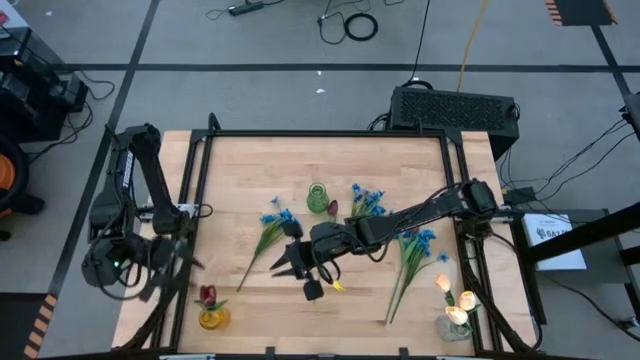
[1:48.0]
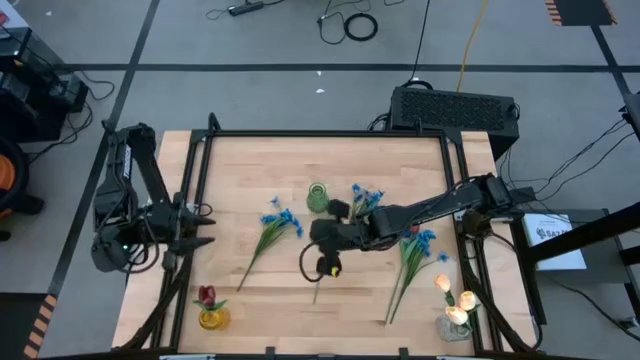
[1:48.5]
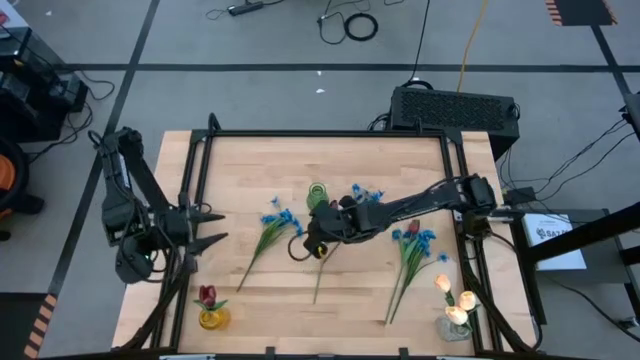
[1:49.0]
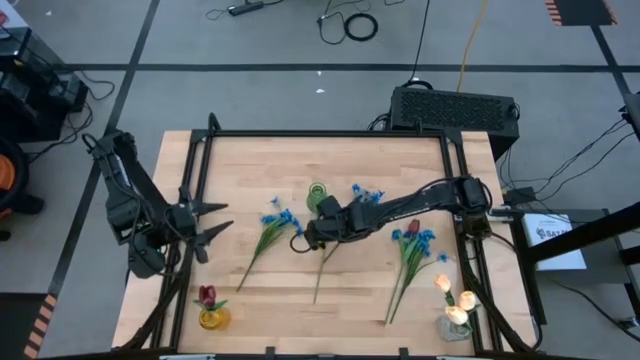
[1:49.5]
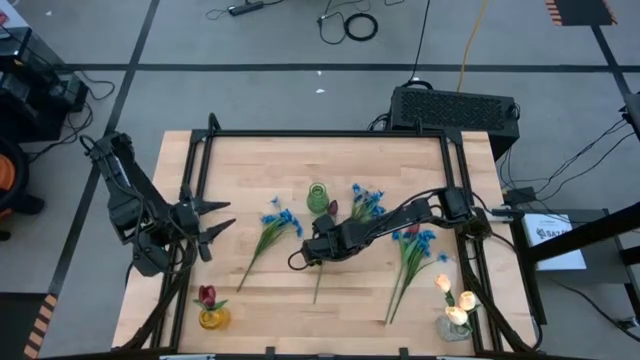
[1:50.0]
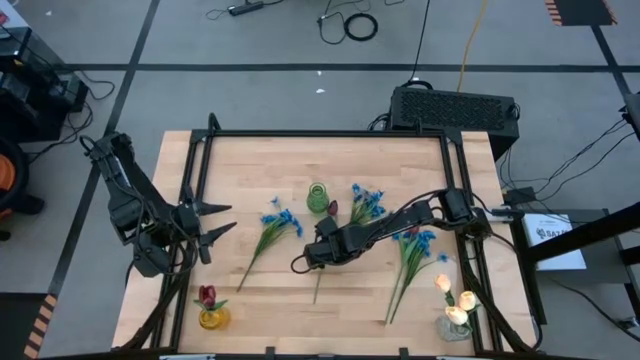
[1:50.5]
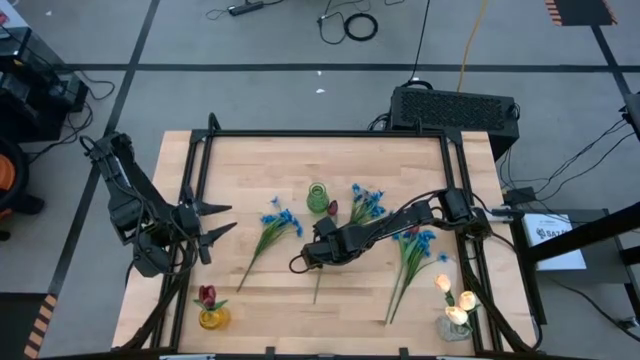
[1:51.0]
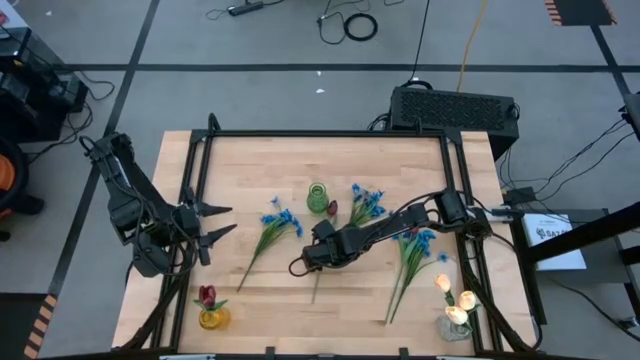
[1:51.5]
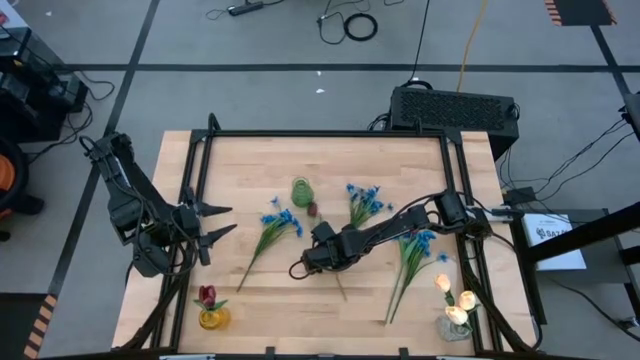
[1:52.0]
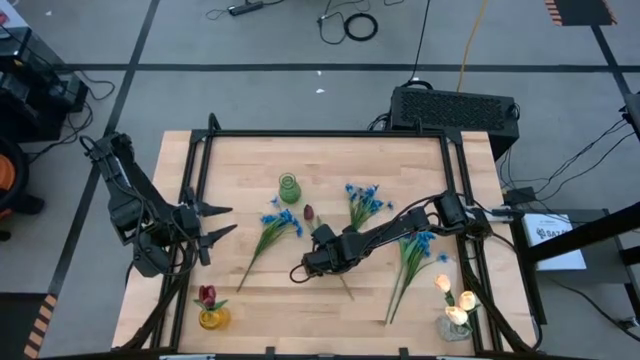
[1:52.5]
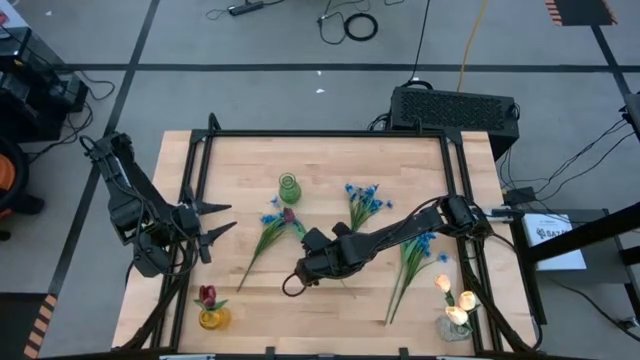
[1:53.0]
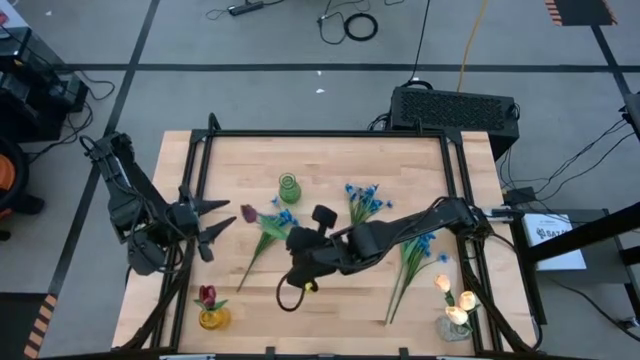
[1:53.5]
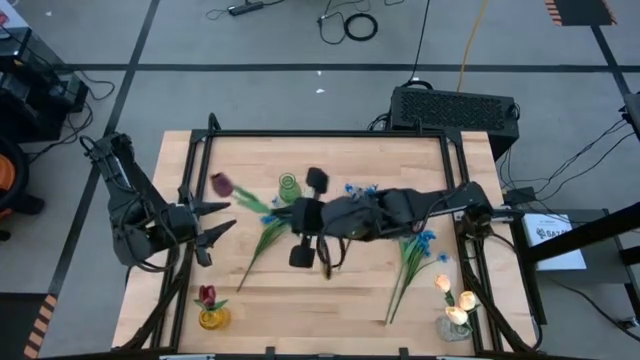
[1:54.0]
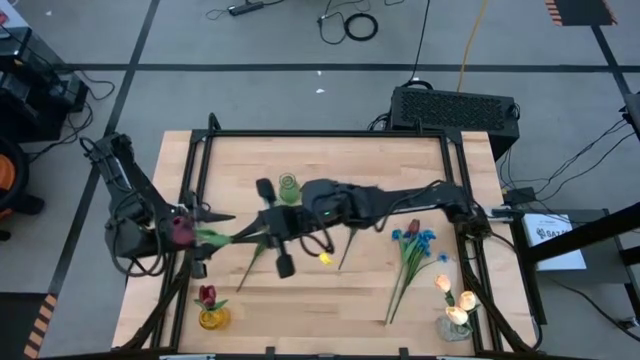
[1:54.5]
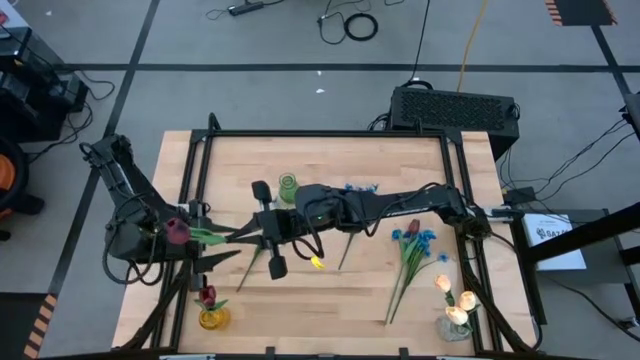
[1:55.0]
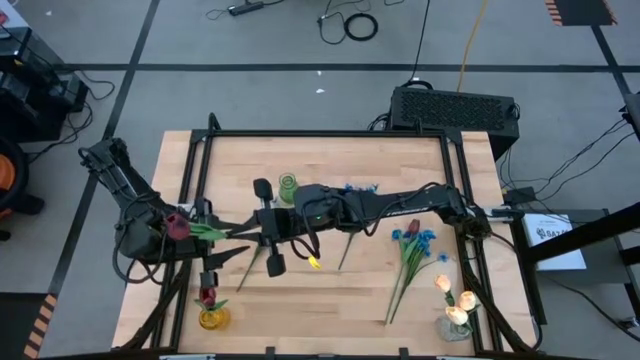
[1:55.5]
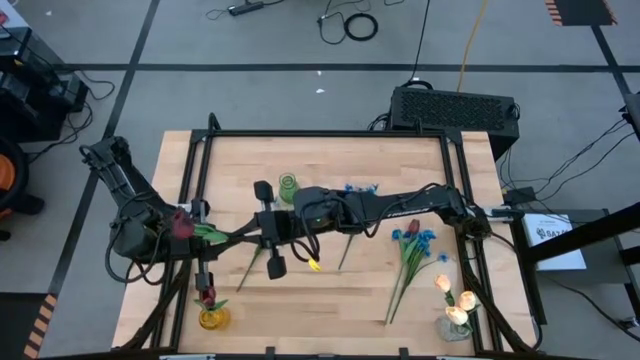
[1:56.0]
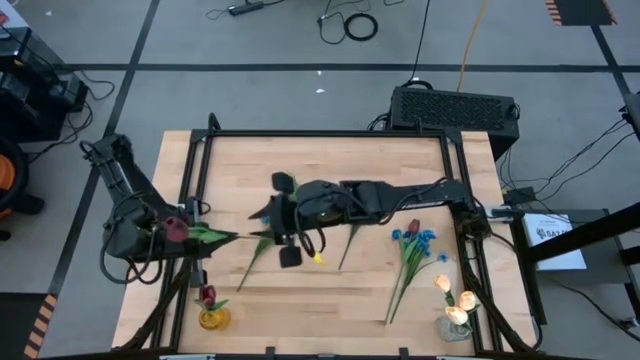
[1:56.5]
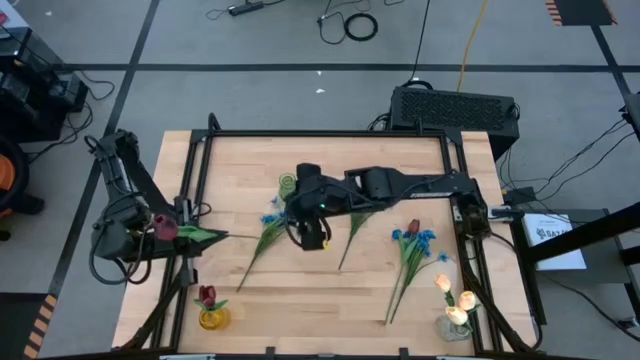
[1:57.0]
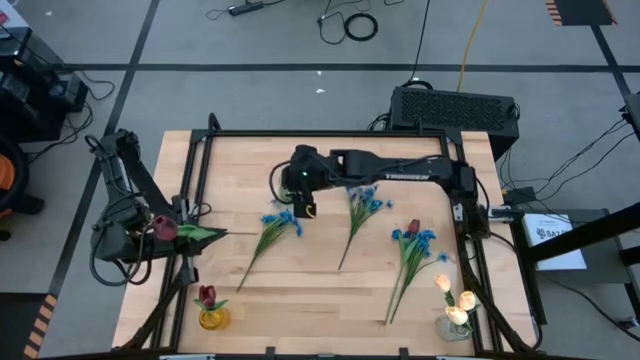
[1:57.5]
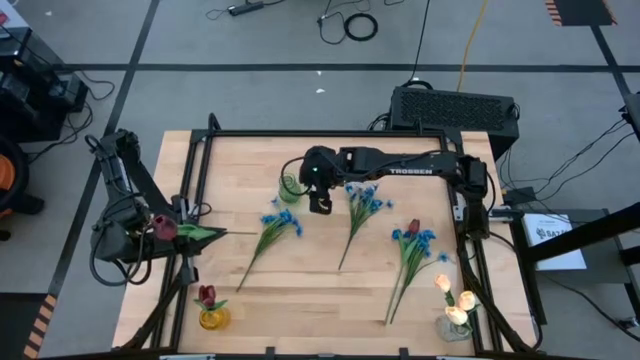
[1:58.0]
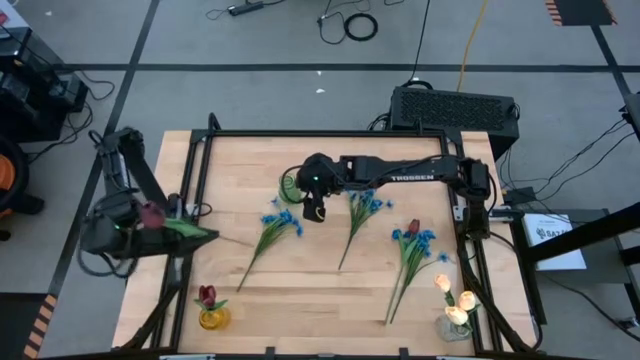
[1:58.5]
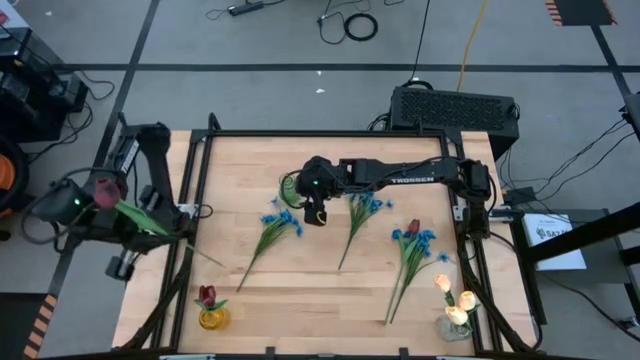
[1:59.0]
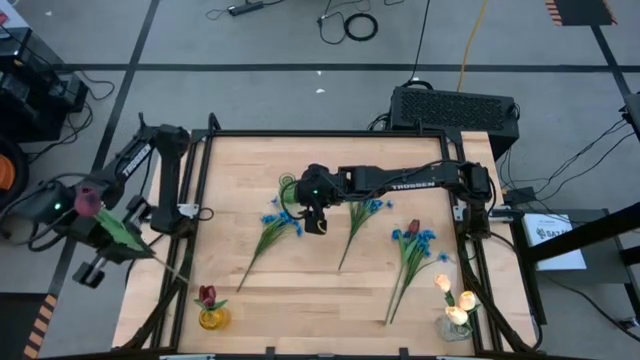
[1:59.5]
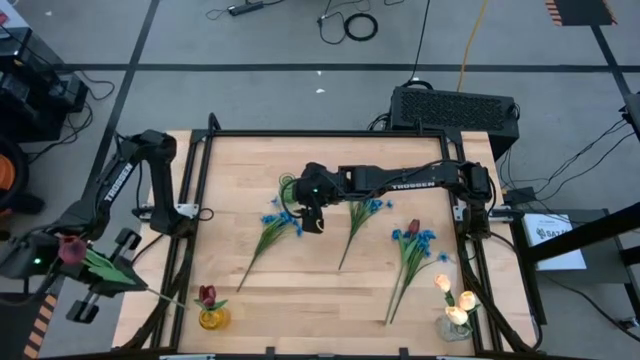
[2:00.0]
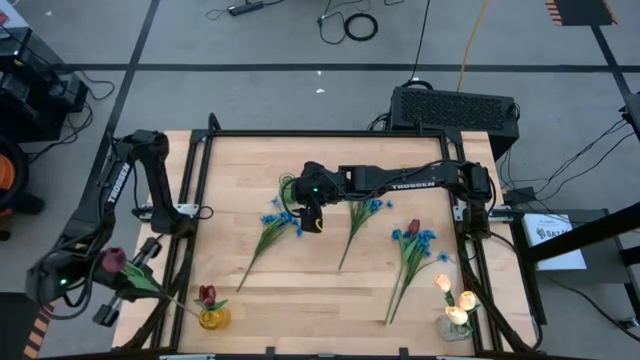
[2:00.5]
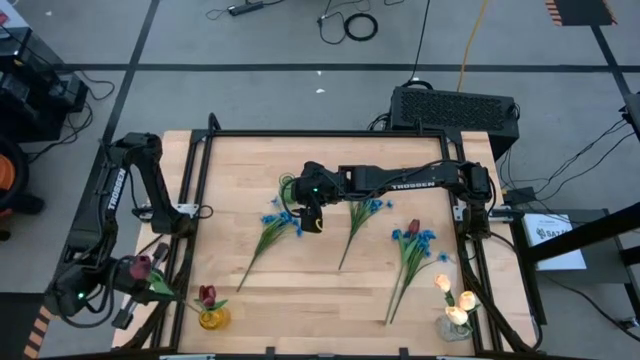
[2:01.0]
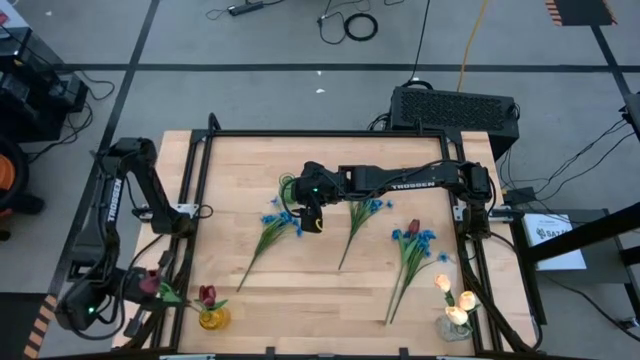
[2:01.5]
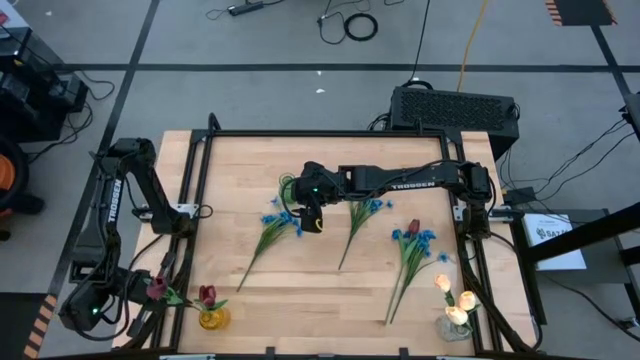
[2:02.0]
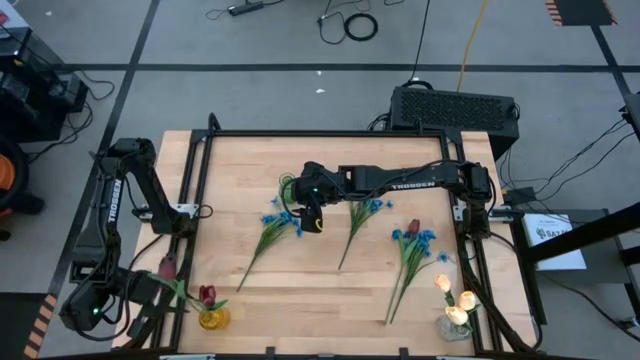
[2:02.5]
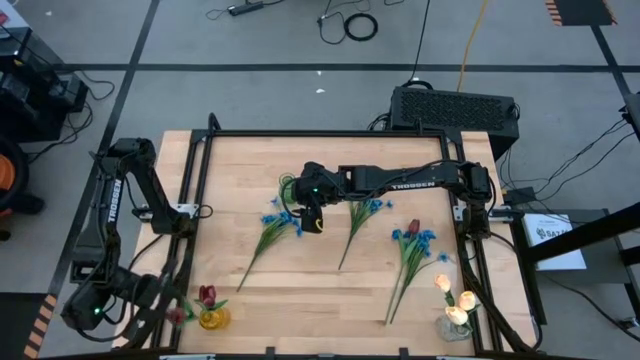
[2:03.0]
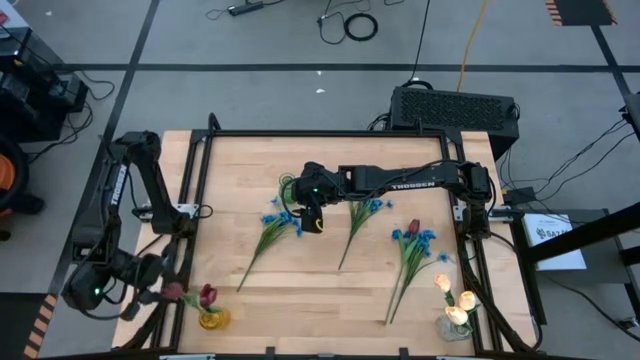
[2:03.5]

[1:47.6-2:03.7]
Task: Sort flowers into vase by color
Put the left red flower into the yellow vase

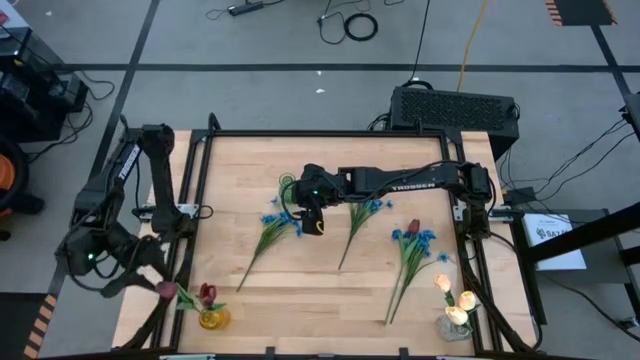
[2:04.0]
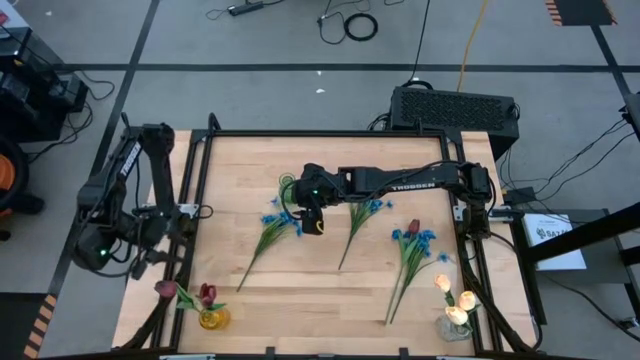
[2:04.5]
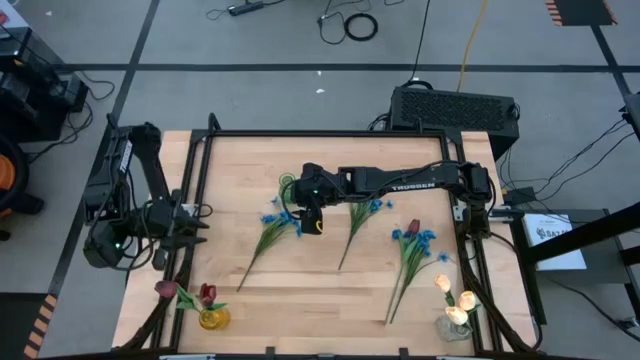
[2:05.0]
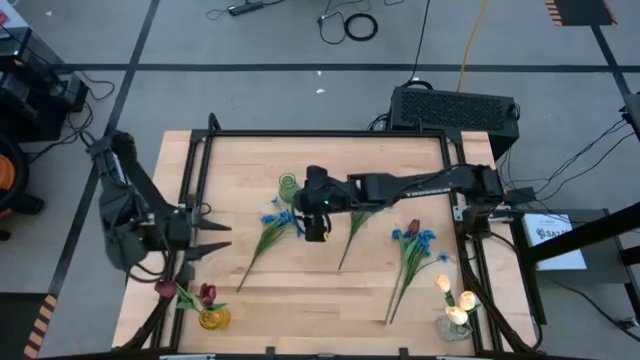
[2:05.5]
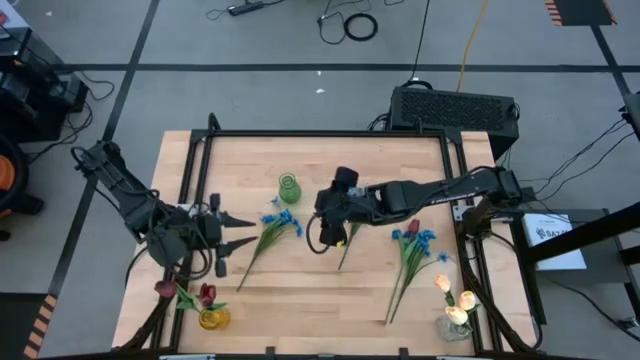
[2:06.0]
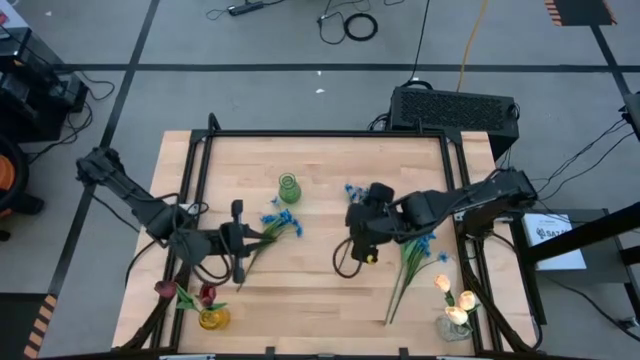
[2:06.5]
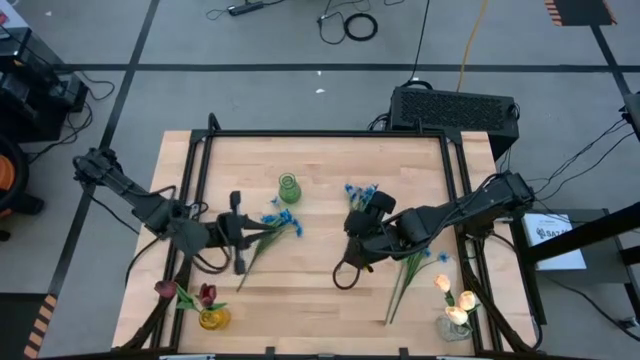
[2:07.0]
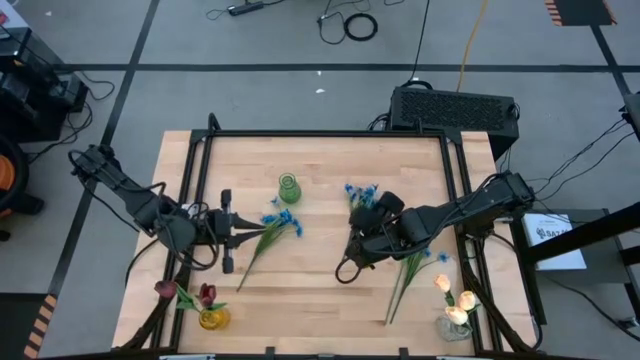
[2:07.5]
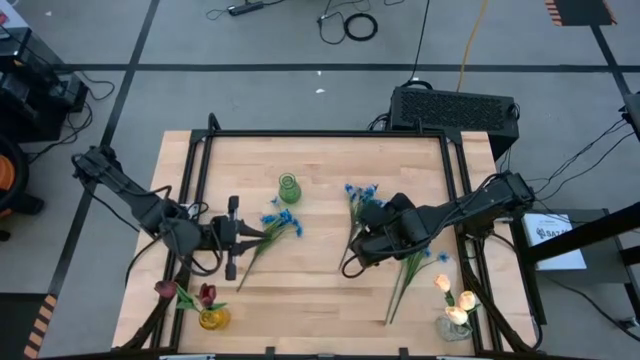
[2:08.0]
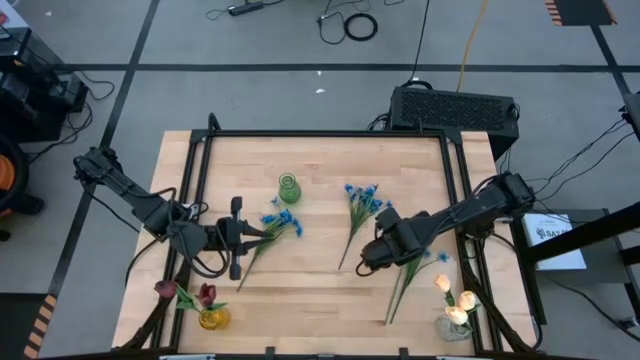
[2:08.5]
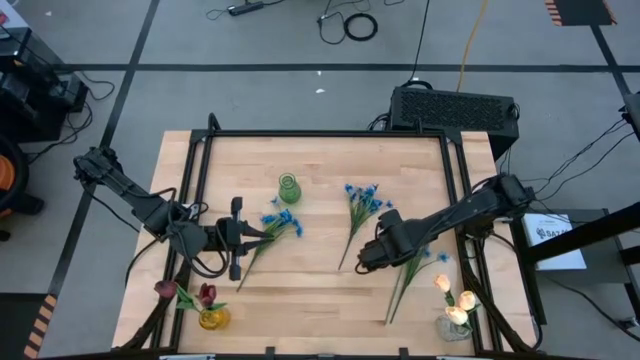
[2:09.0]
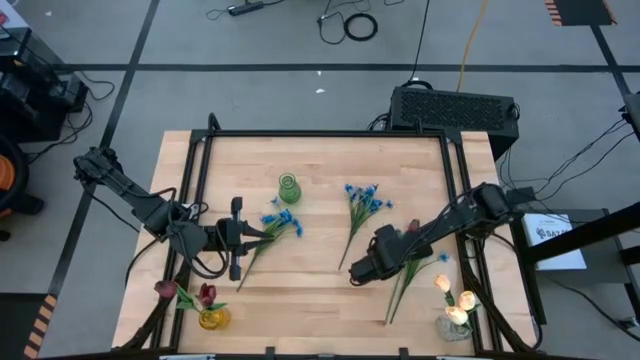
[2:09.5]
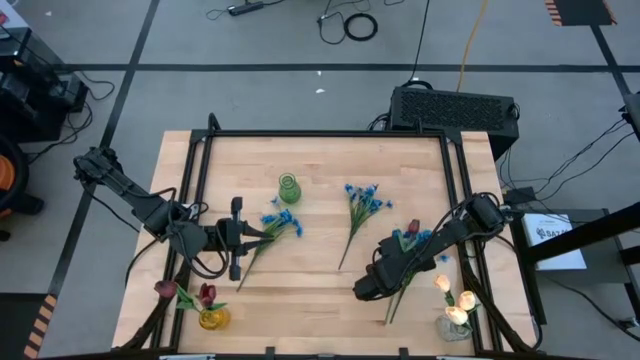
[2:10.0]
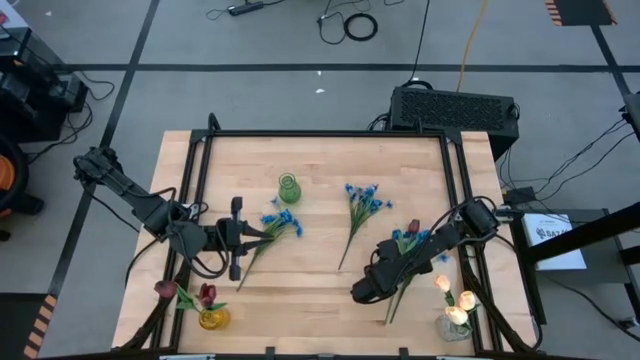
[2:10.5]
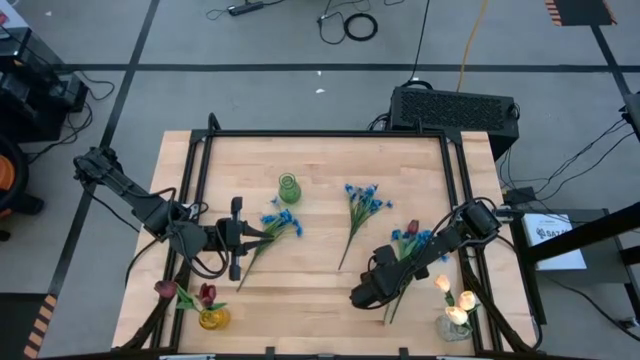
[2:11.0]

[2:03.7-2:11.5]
Put the red flower into the yellow vase
